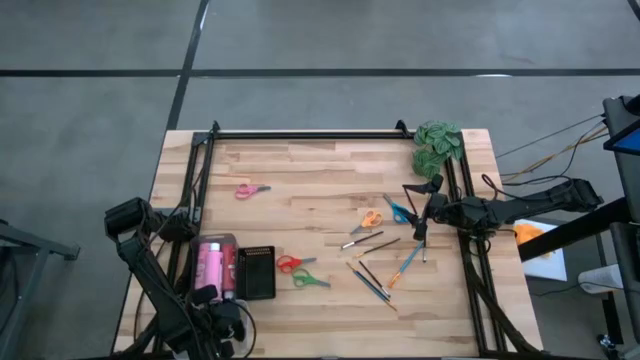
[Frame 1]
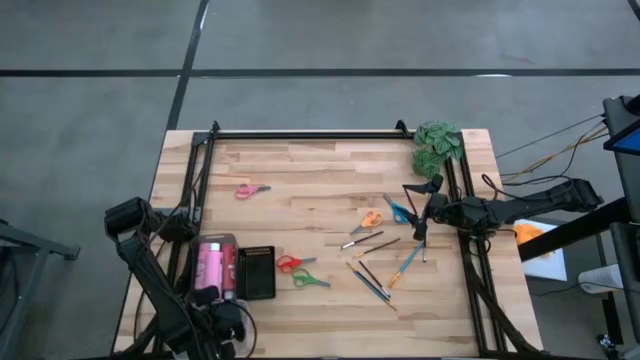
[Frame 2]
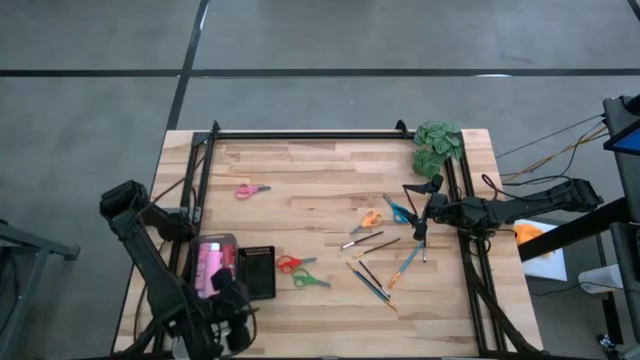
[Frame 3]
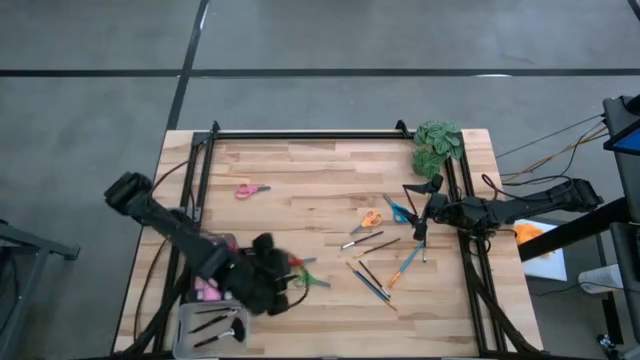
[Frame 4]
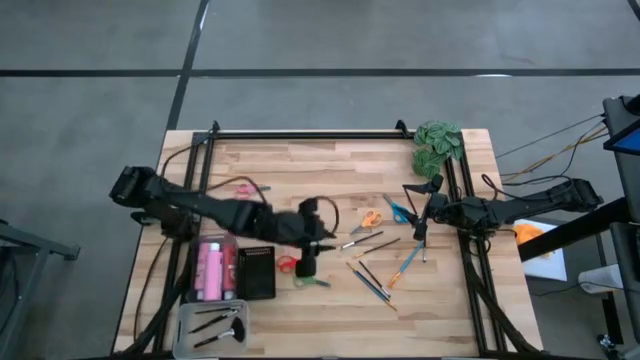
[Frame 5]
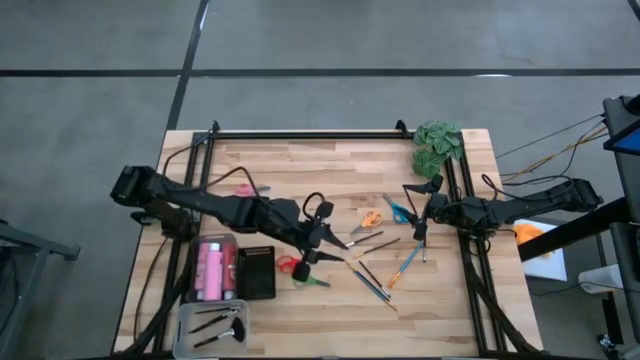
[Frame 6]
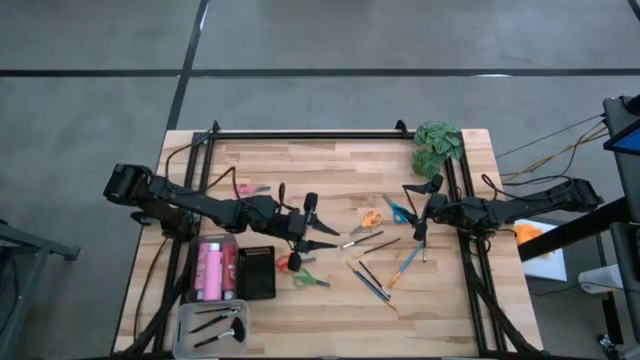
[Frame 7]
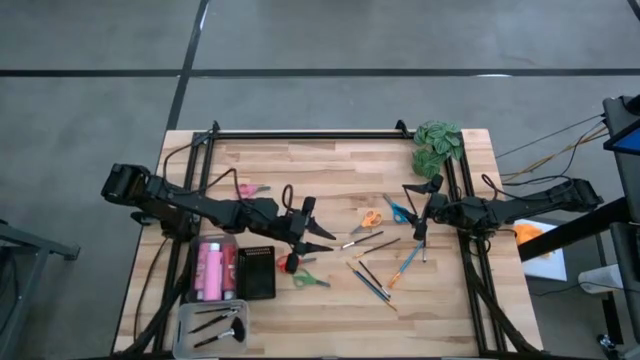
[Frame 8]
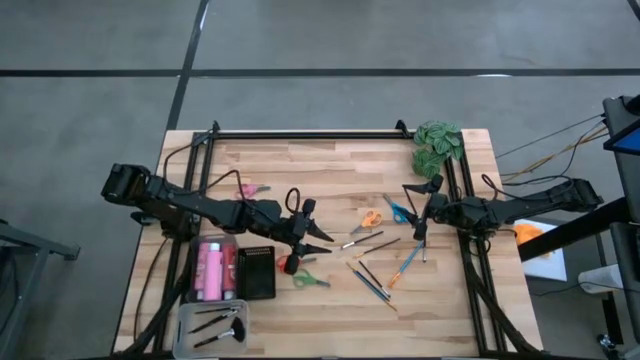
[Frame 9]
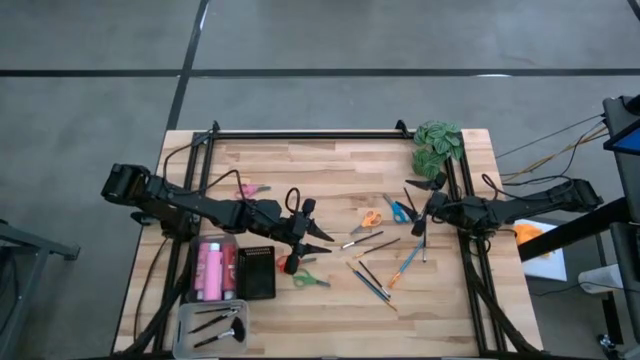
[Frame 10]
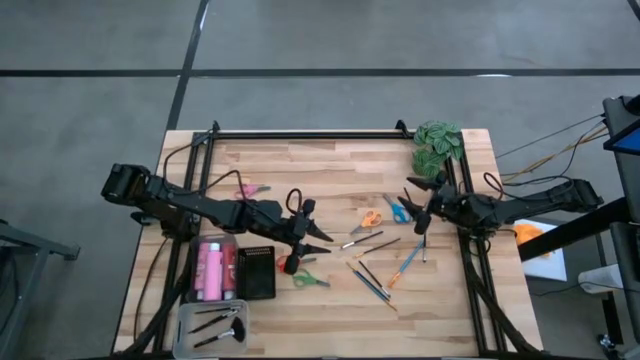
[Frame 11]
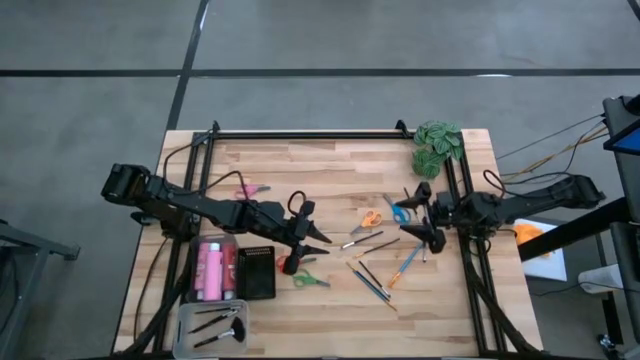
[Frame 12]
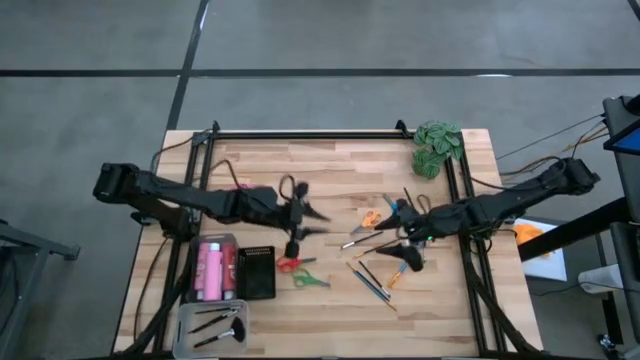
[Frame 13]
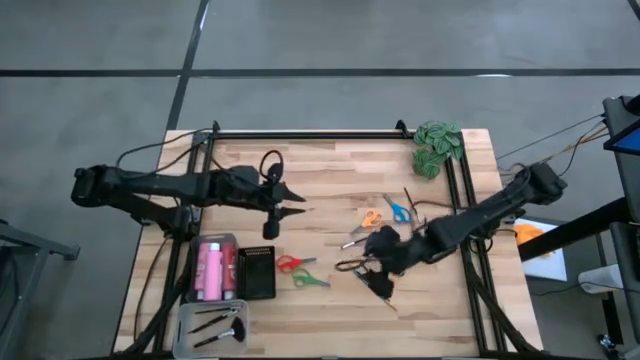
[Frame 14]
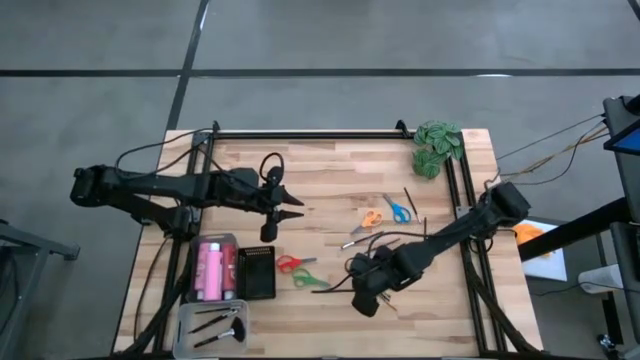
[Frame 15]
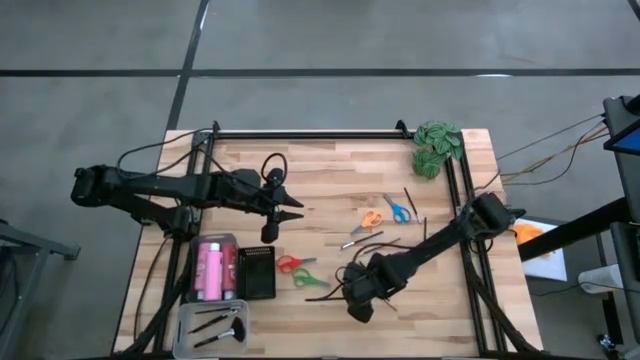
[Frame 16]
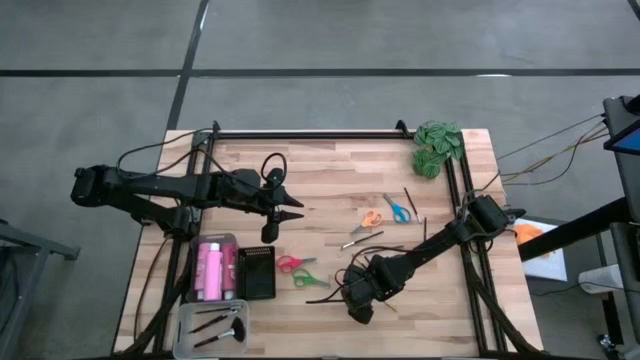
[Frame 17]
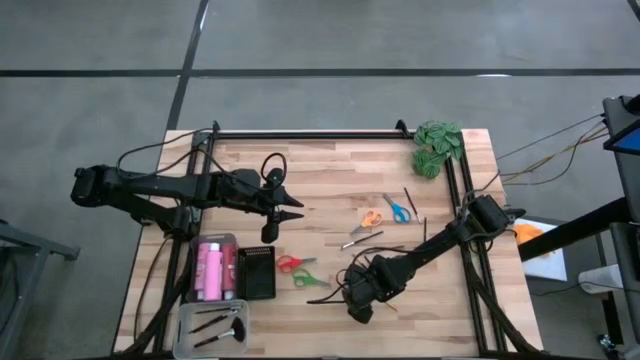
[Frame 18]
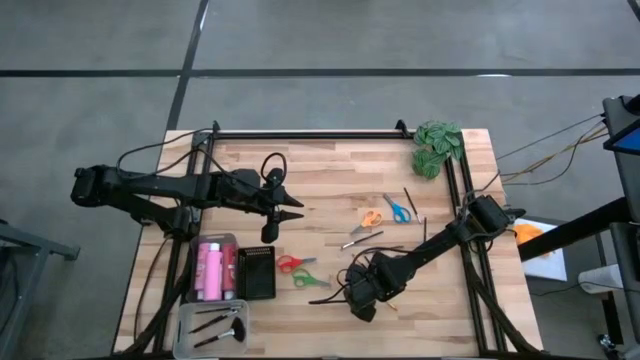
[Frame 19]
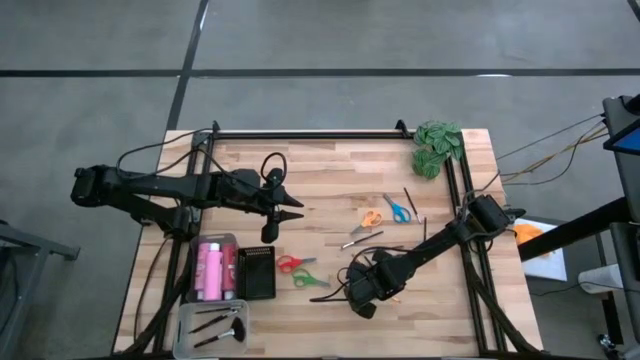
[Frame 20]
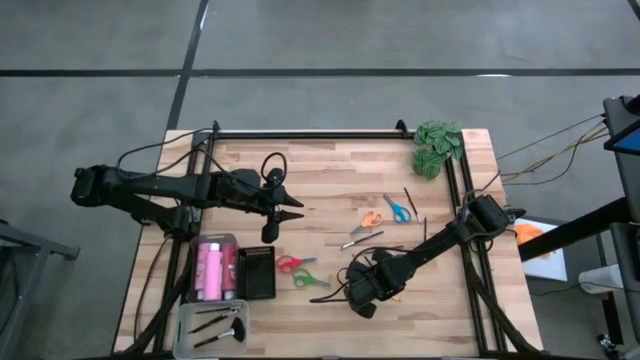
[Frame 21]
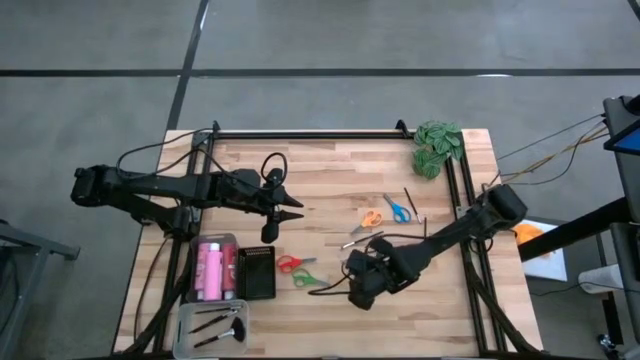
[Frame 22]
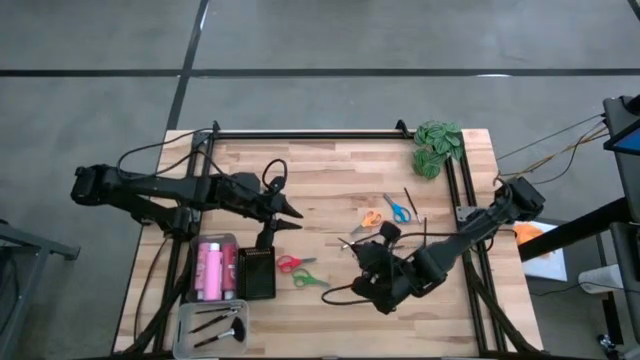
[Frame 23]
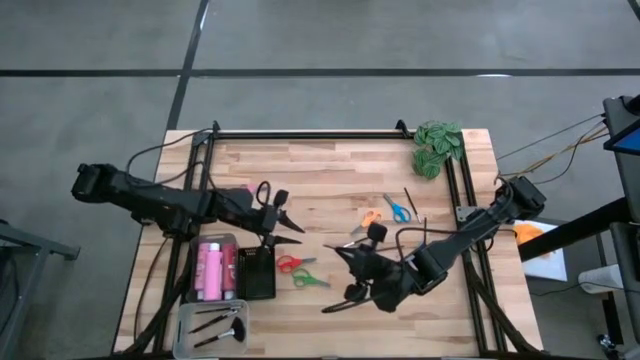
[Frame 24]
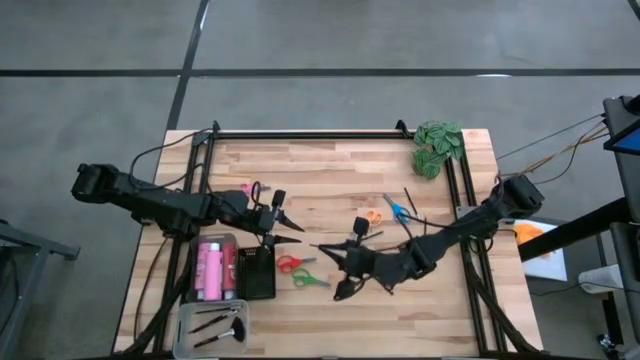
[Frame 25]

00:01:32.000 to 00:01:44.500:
Task: Pick & Place Paint Supplies
Put the gold paint brush into the transparent bin

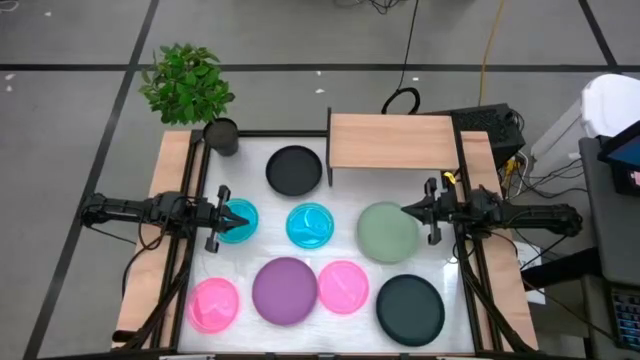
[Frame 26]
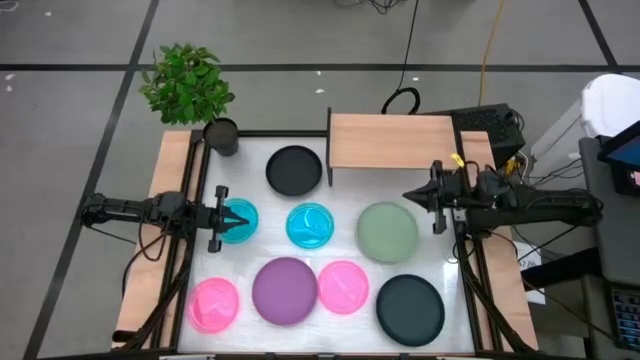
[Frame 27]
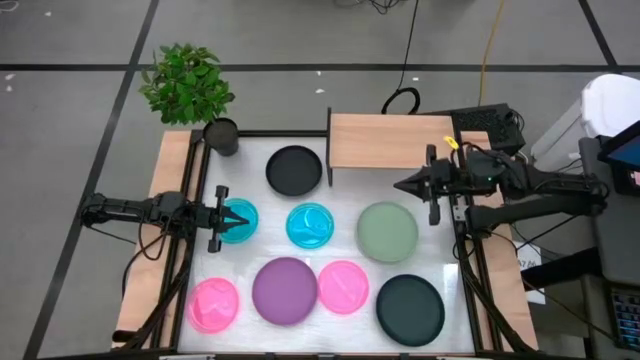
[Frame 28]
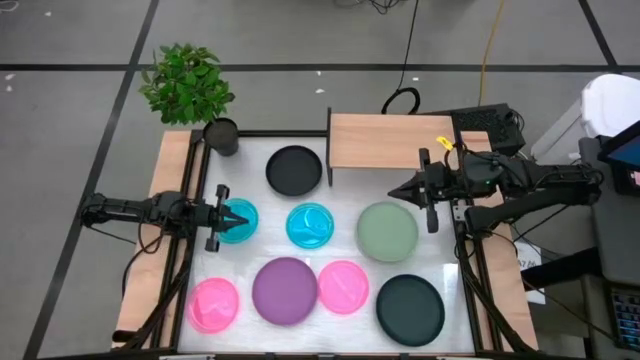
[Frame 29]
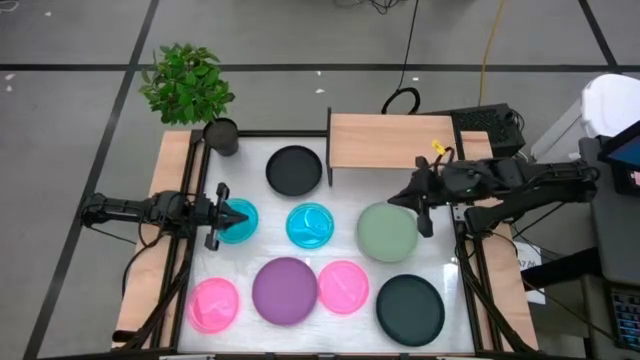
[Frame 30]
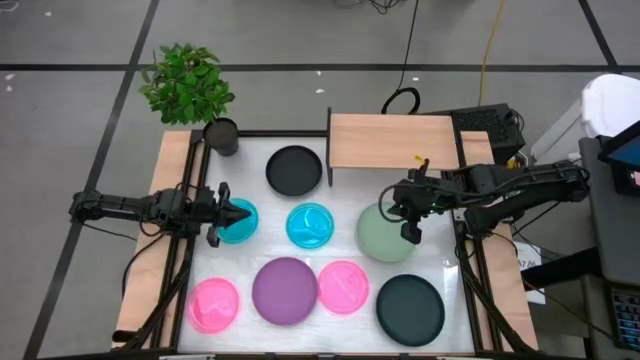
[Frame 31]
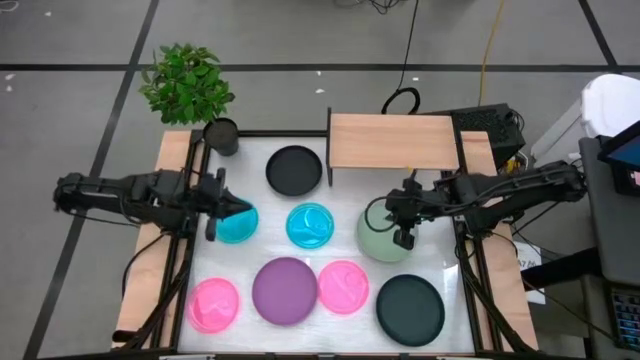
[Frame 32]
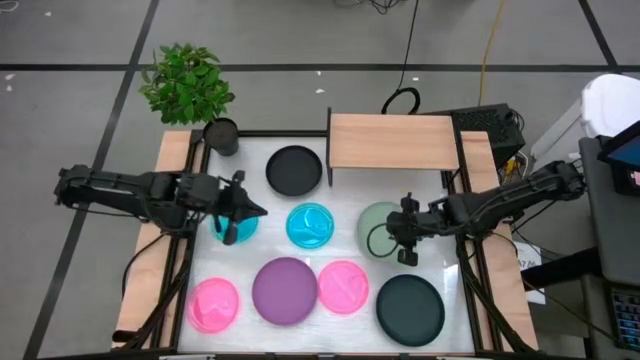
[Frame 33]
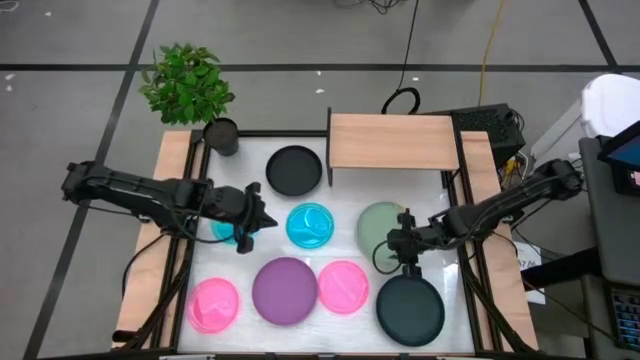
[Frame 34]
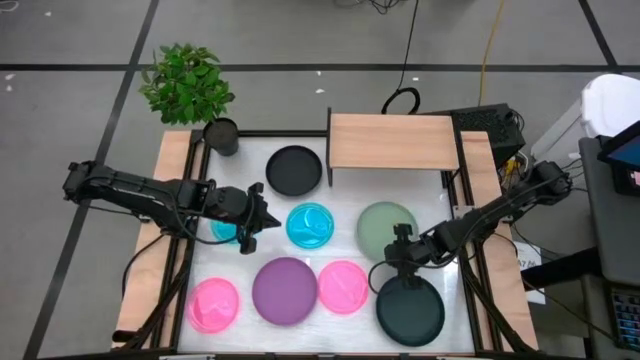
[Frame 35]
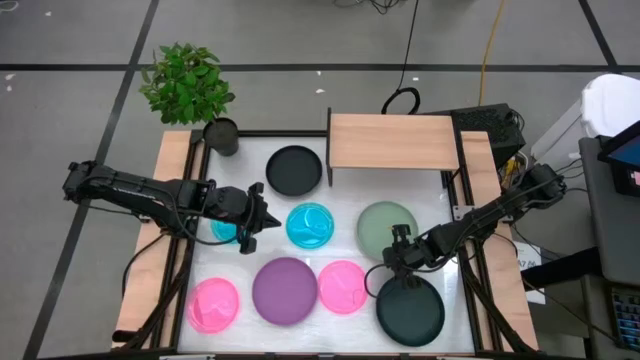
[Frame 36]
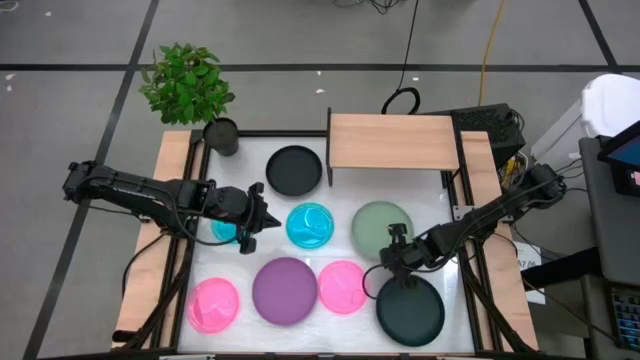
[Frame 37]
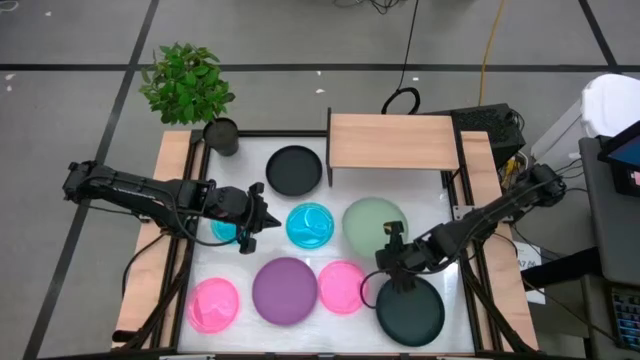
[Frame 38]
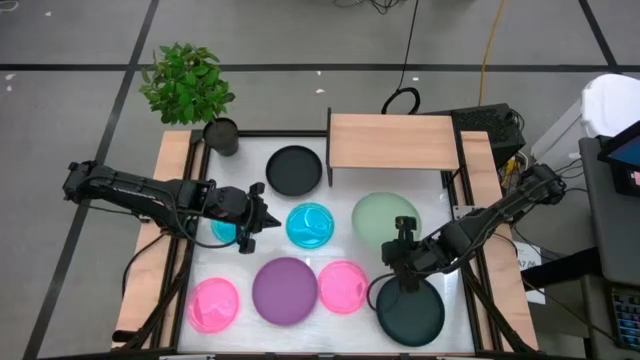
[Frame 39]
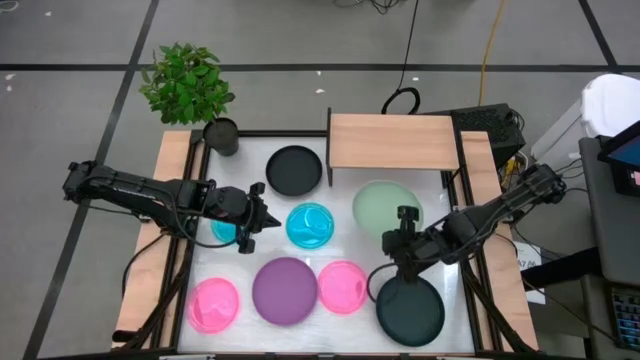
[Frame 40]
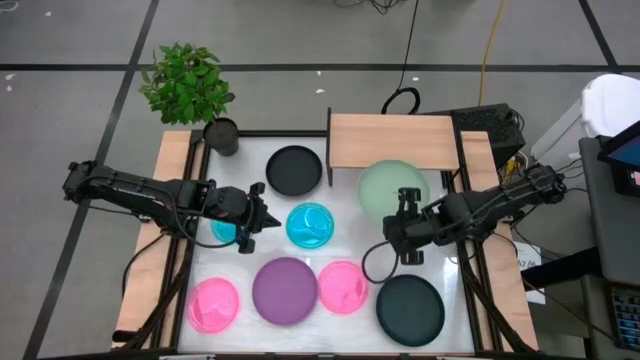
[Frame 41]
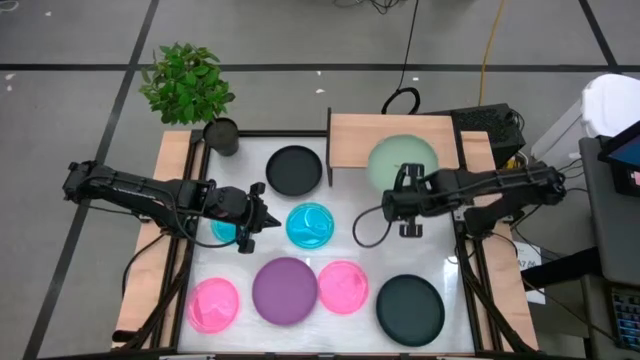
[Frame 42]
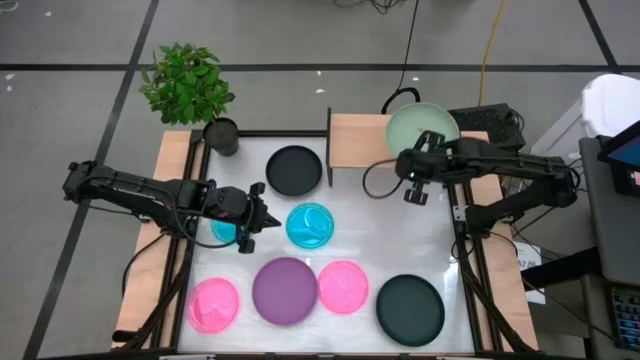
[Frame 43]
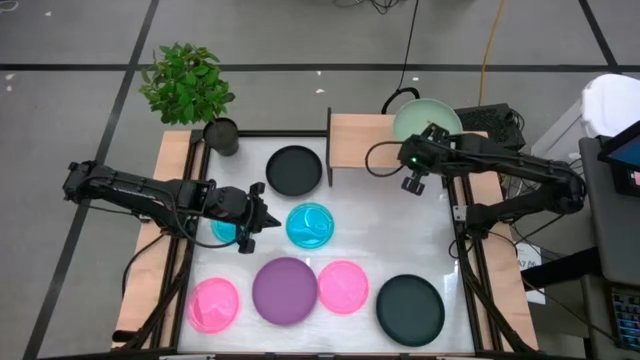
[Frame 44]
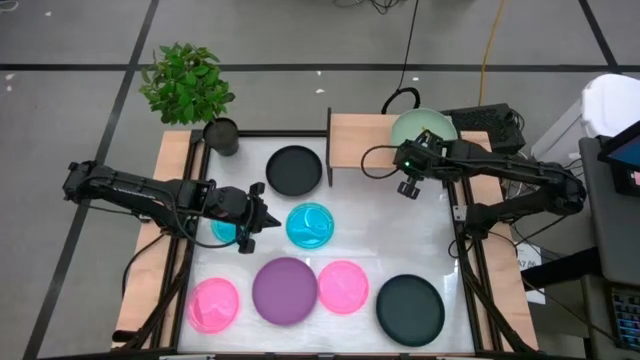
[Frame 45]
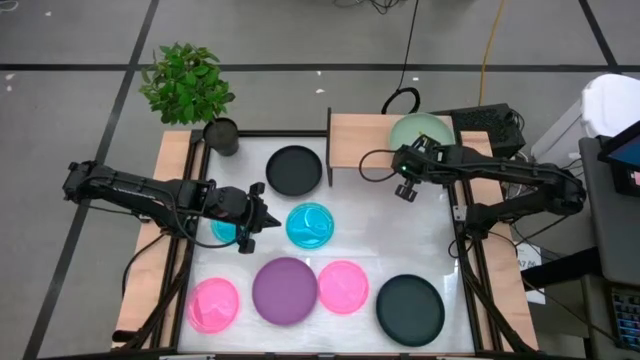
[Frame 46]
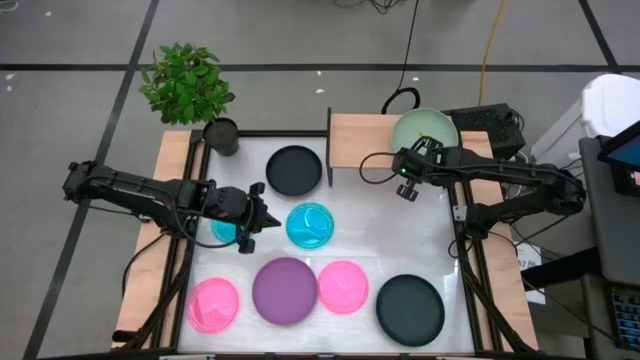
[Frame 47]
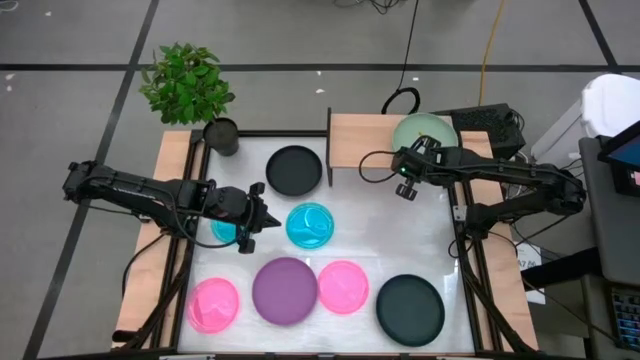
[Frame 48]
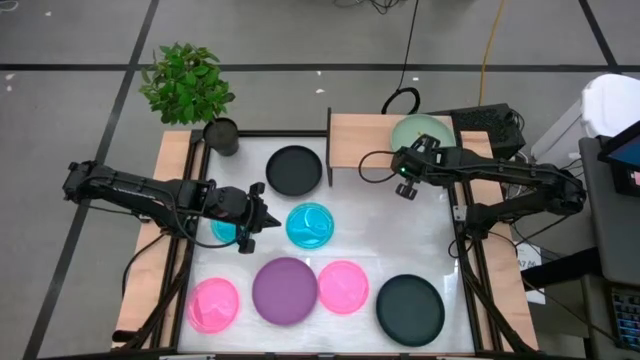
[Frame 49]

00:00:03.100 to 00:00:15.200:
Task: Place and stack plates onto a shelf
Put the big green plate on the shelf
